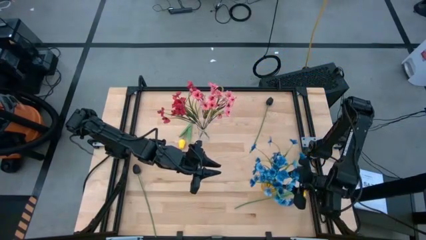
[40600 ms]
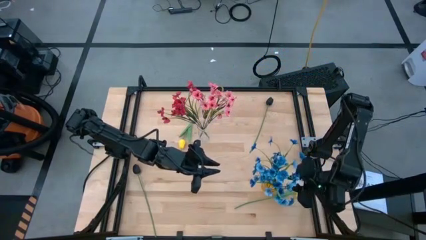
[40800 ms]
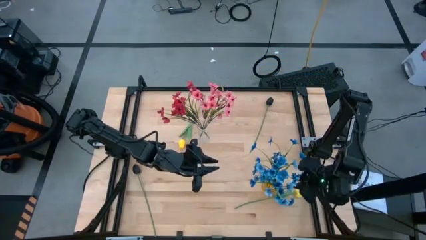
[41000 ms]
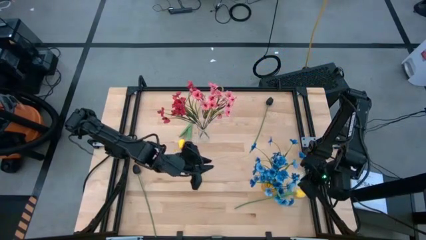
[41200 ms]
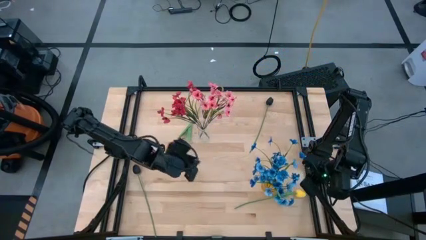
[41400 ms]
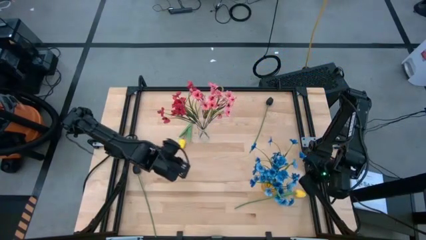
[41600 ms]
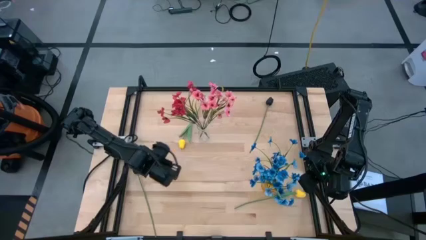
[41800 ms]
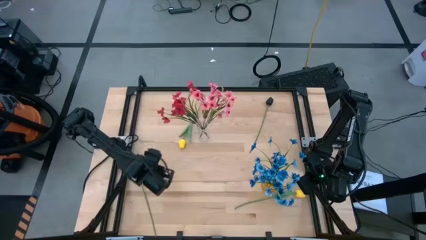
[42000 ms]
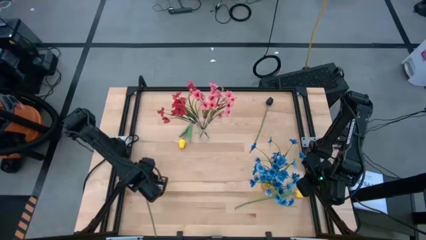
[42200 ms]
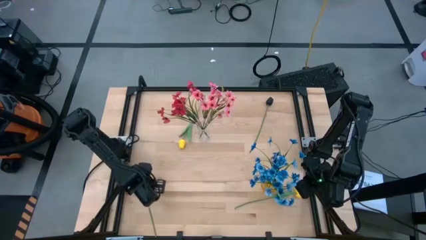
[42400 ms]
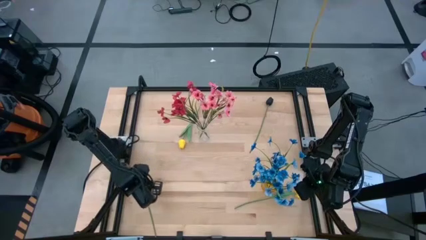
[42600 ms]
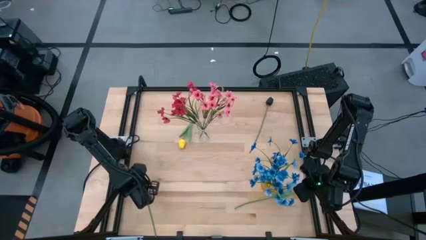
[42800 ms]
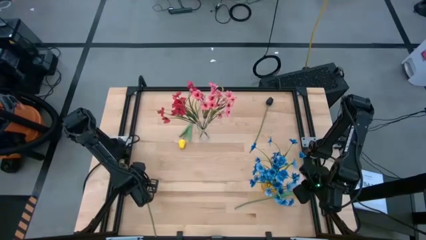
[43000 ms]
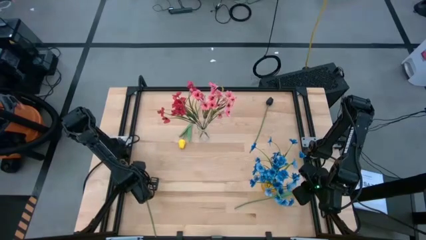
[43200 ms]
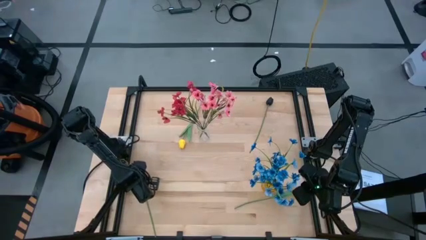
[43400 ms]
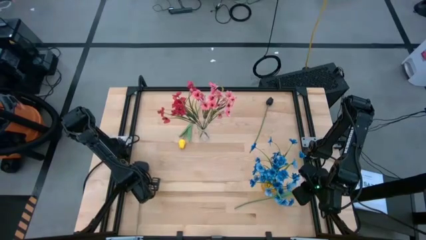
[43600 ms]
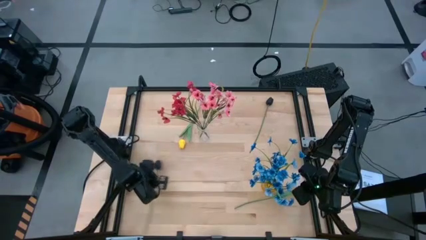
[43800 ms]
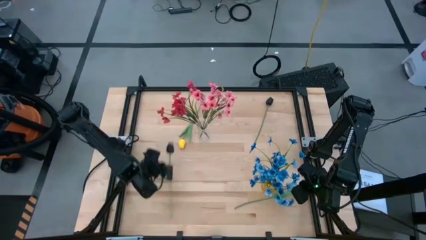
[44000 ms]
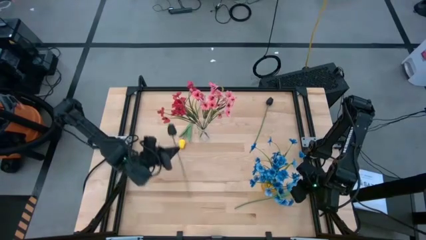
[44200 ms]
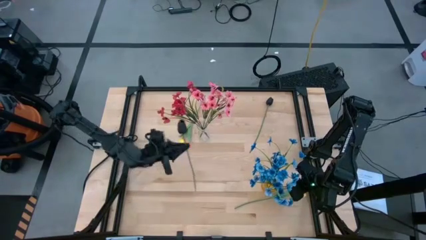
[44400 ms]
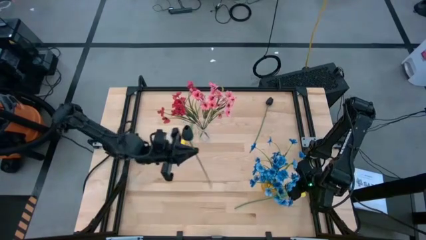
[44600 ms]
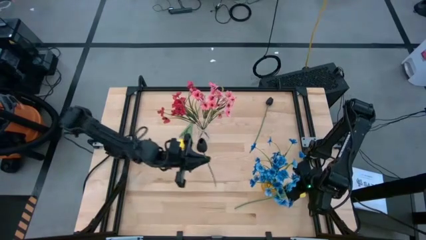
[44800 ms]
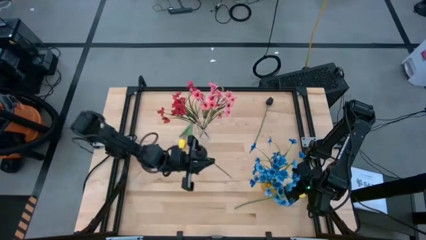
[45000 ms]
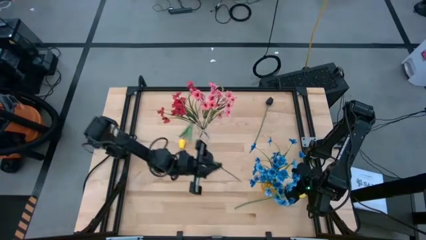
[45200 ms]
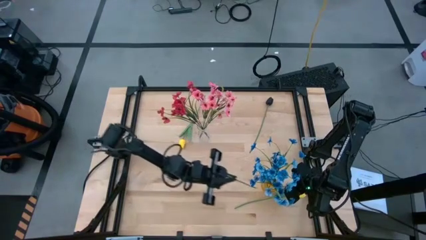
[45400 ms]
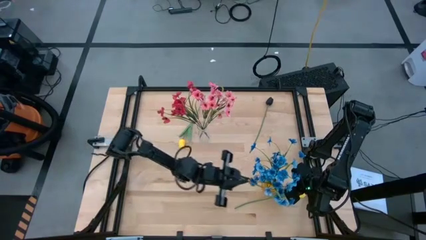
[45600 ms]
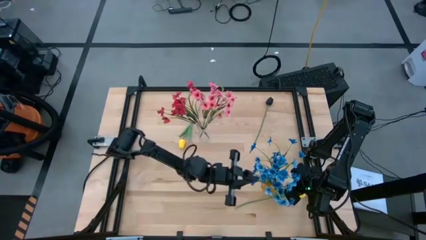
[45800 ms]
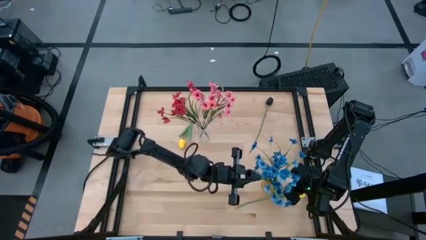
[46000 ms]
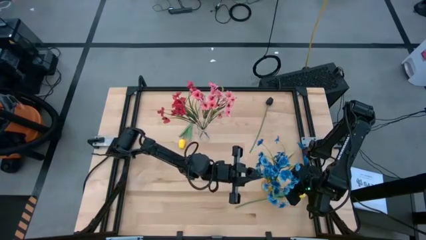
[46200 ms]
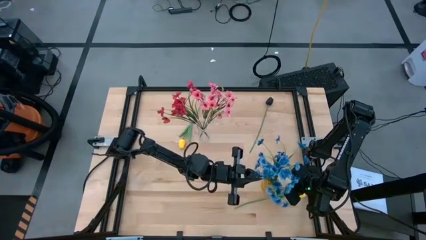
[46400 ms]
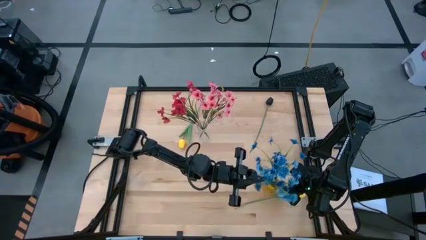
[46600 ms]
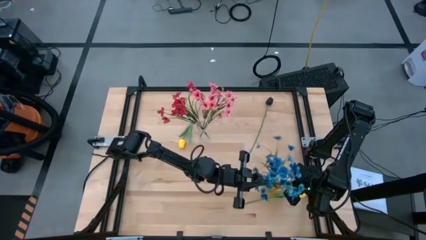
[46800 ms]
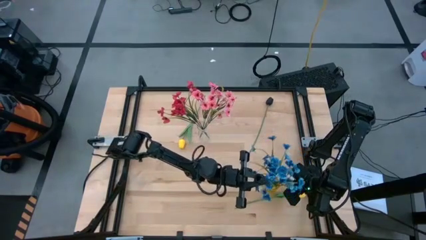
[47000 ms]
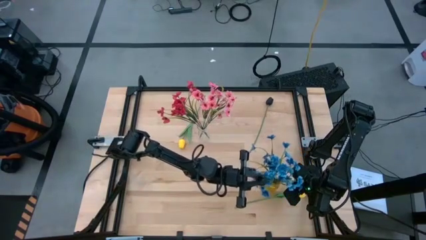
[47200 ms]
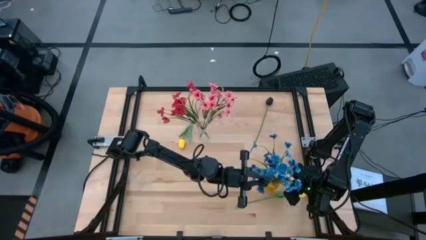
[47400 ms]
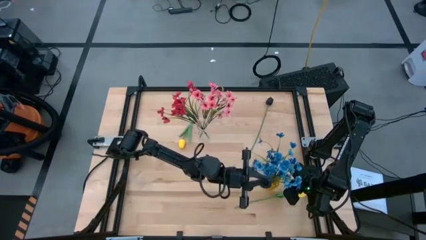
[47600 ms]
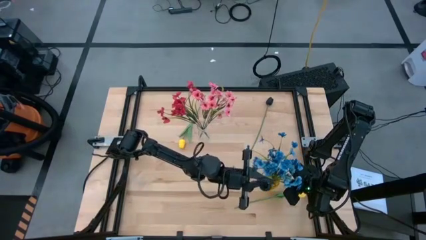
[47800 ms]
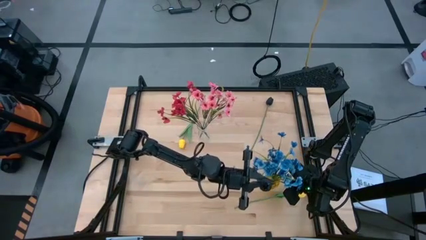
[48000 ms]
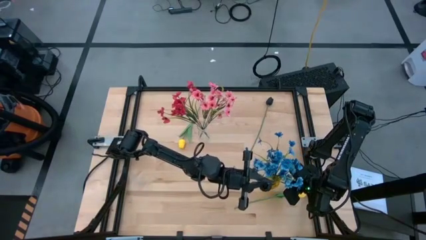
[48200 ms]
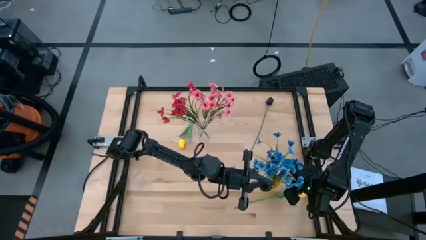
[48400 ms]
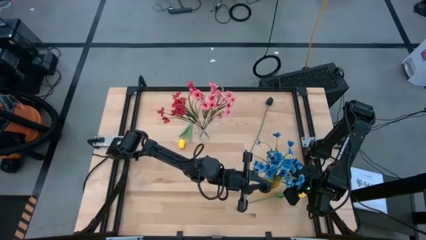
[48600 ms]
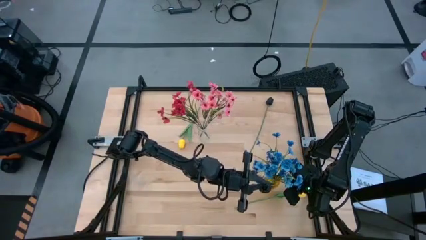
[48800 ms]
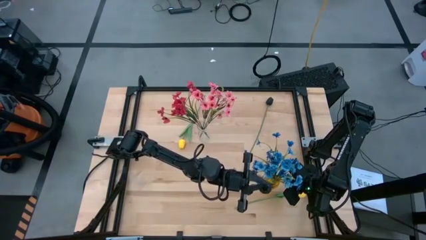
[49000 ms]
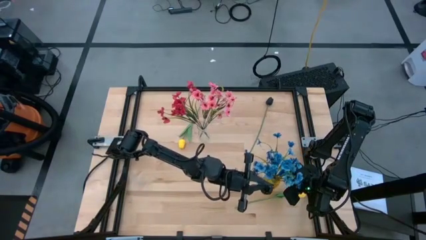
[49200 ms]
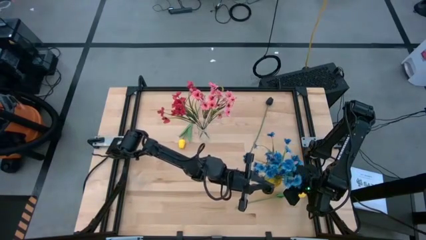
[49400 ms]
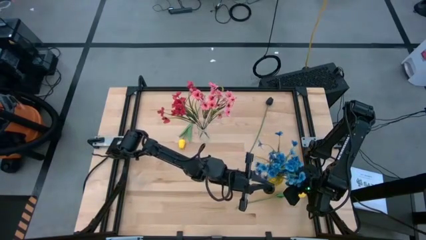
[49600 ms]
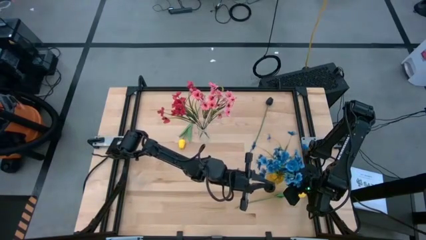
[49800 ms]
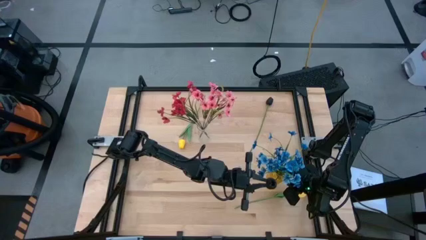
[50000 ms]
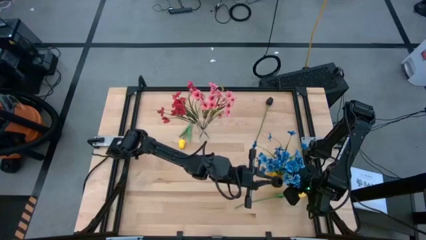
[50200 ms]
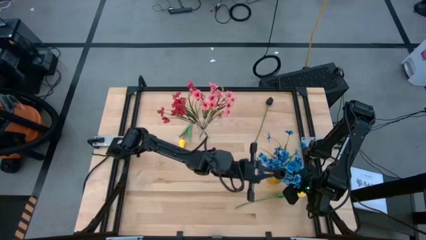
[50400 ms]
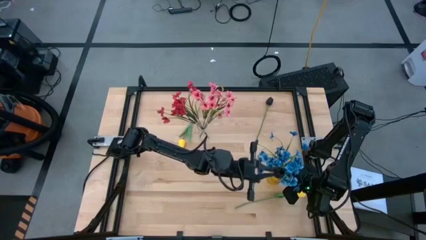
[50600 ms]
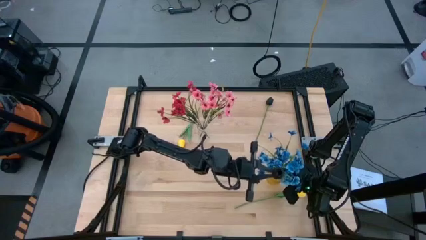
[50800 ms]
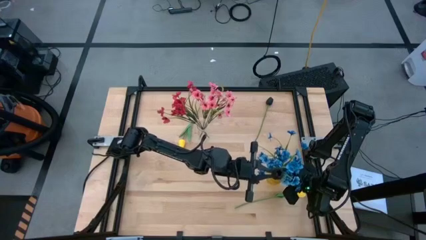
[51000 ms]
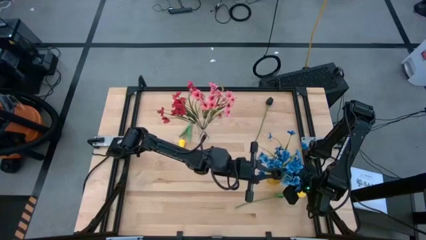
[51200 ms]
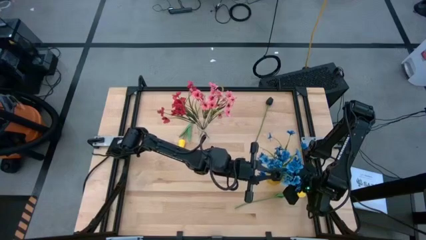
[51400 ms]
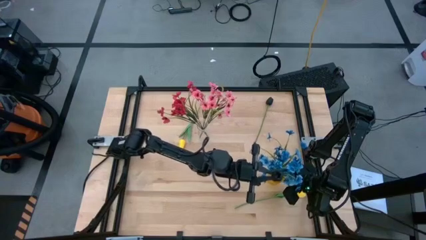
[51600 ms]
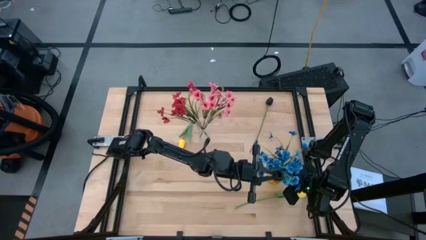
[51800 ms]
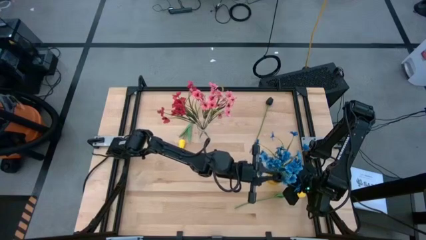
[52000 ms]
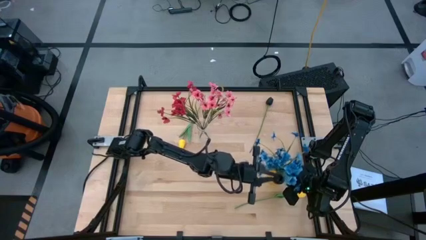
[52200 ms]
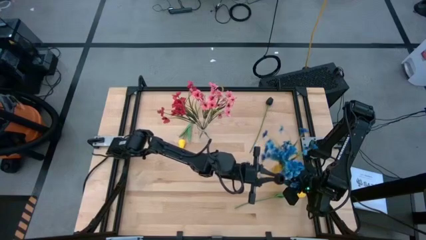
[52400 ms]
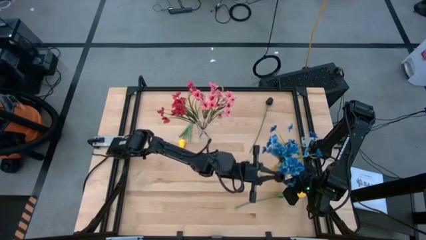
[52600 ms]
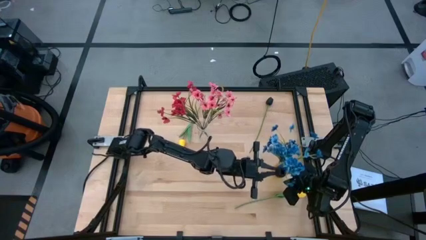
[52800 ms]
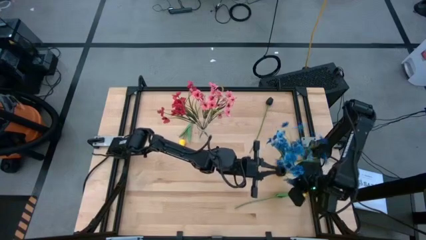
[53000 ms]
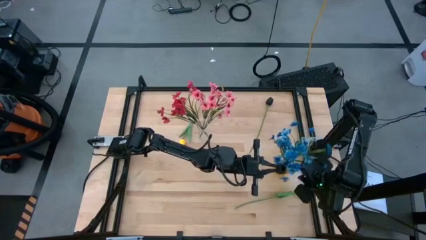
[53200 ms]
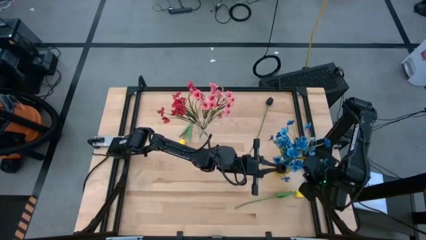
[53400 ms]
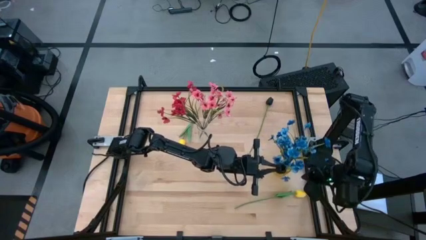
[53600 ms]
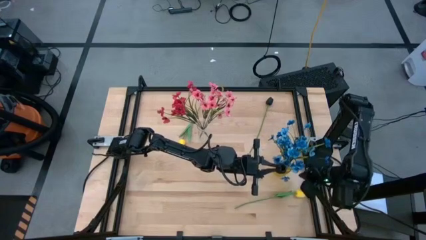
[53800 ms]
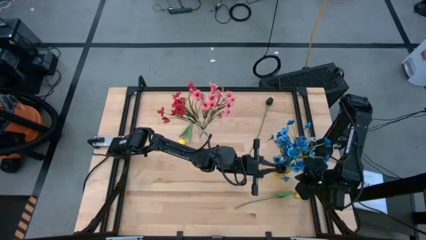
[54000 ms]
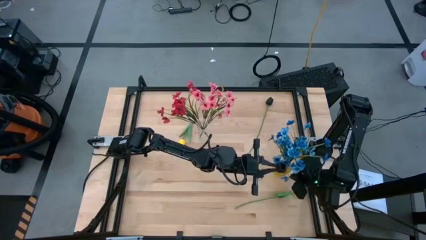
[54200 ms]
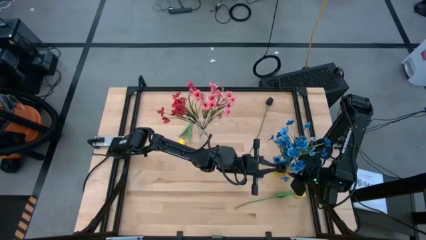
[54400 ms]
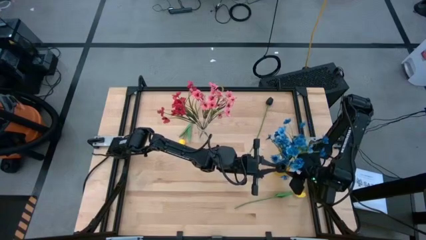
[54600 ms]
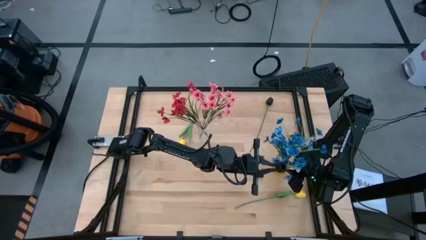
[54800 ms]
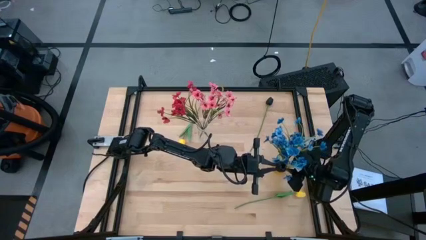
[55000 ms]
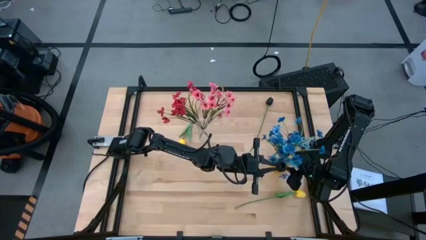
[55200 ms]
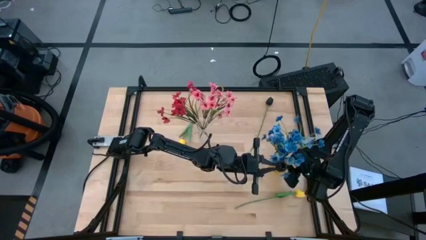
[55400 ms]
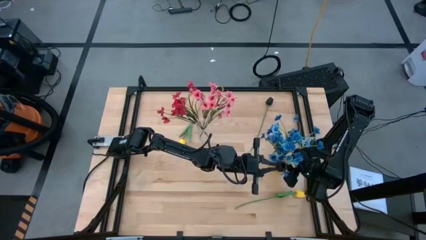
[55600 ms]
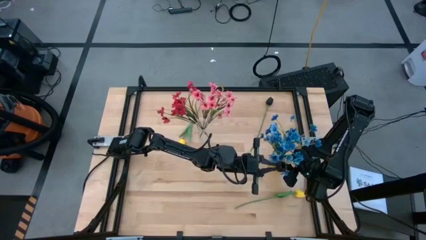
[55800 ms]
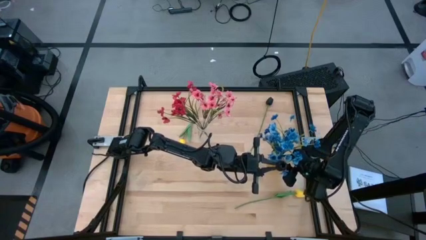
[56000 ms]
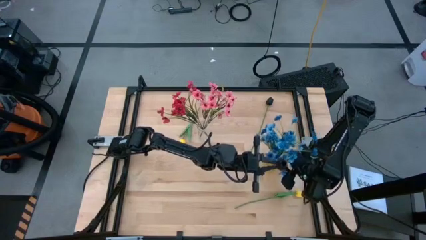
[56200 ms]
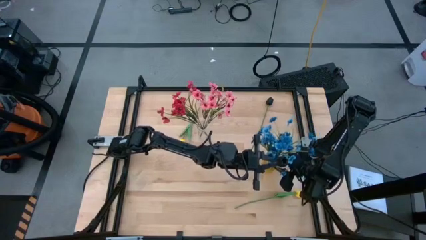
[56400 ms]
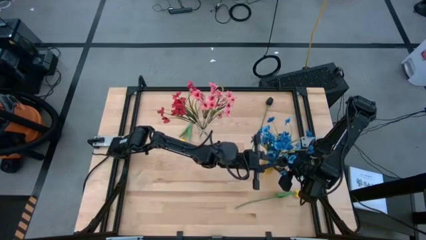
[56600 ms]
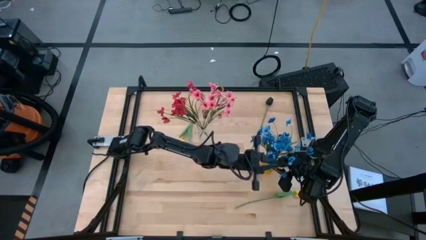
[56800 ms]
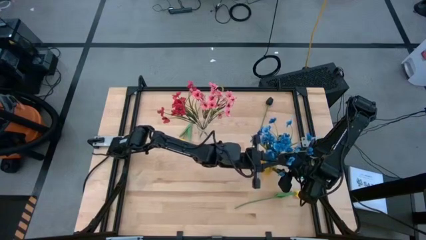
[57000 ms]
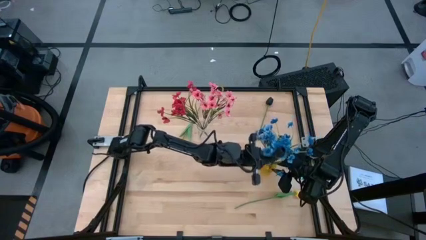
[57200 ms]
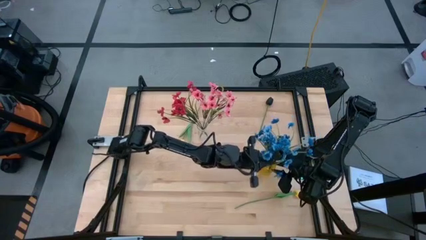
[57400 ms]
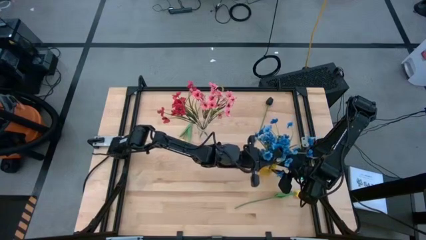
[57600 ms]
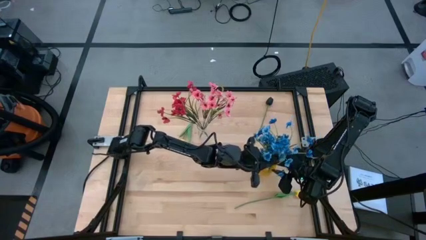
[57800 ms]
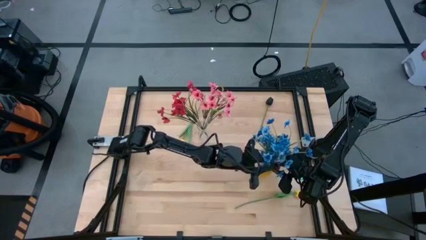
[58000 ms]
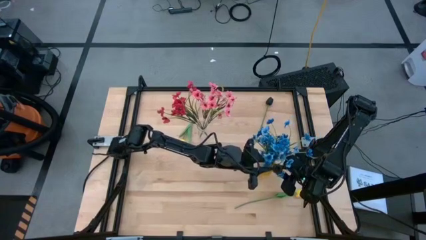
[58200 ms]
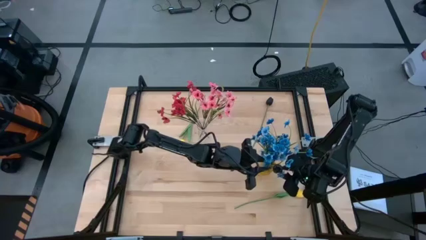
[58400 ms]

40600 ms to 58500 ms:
Task: Sort flowers into vase by color
Put the bottom black flower into the yellow vase
